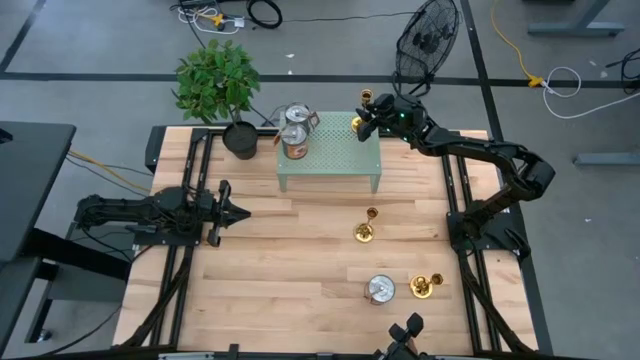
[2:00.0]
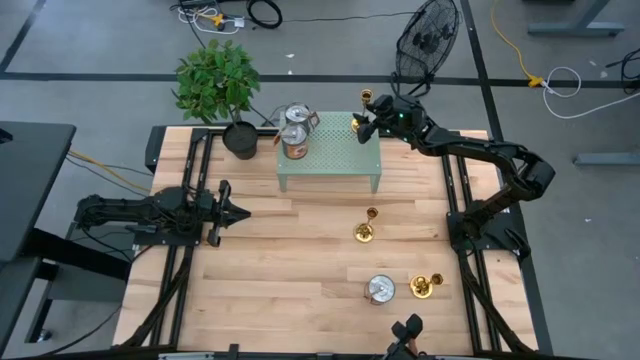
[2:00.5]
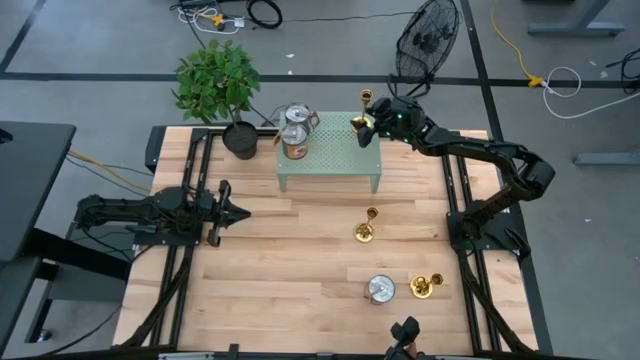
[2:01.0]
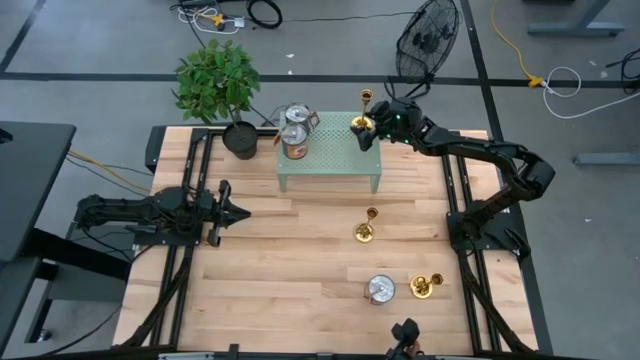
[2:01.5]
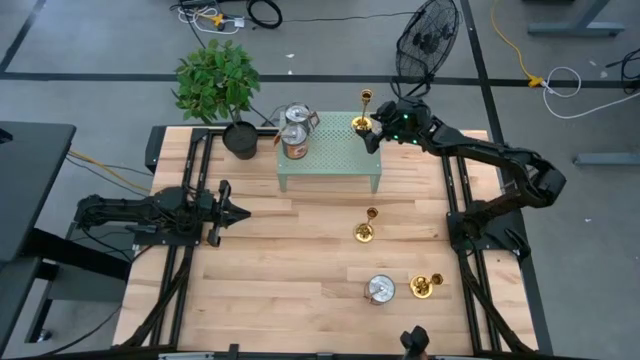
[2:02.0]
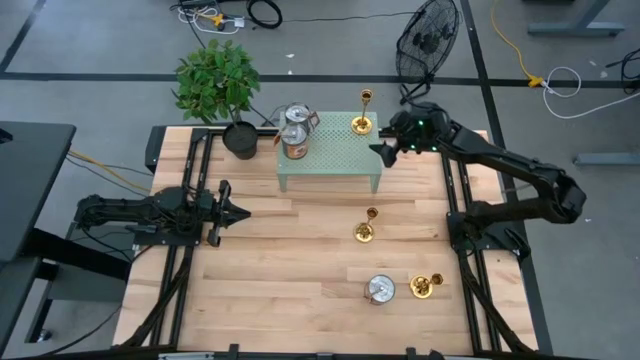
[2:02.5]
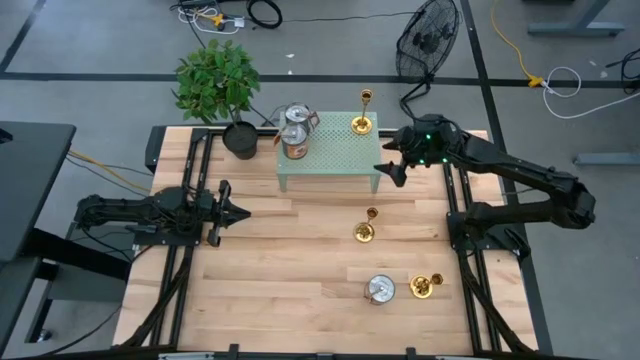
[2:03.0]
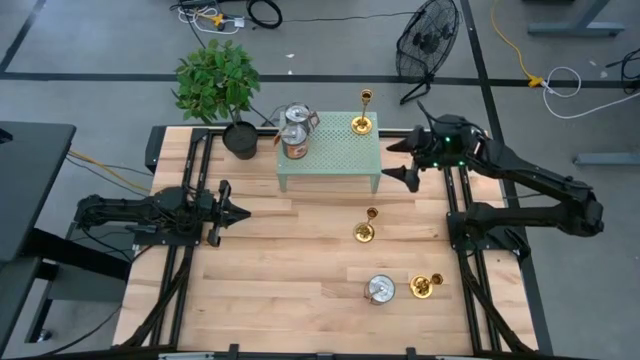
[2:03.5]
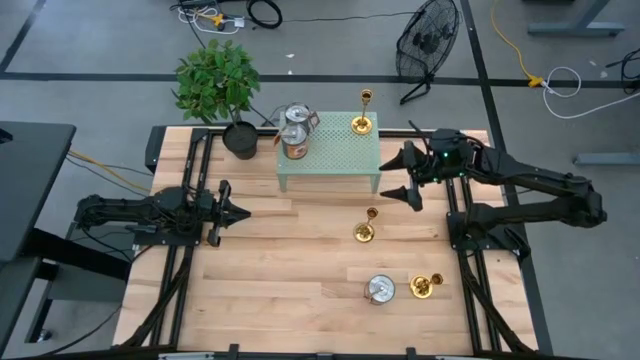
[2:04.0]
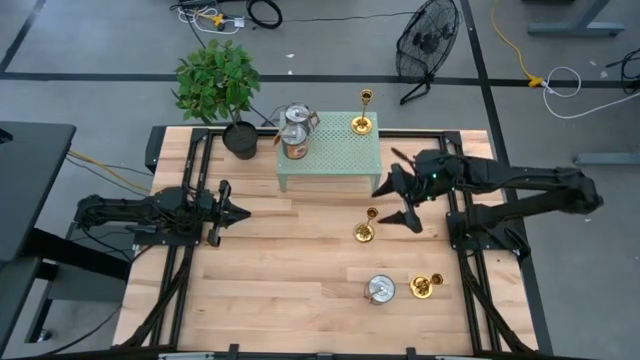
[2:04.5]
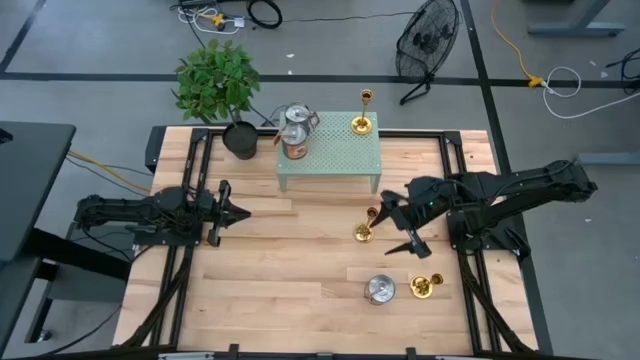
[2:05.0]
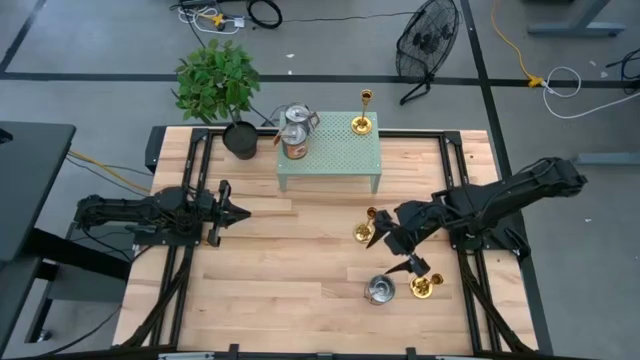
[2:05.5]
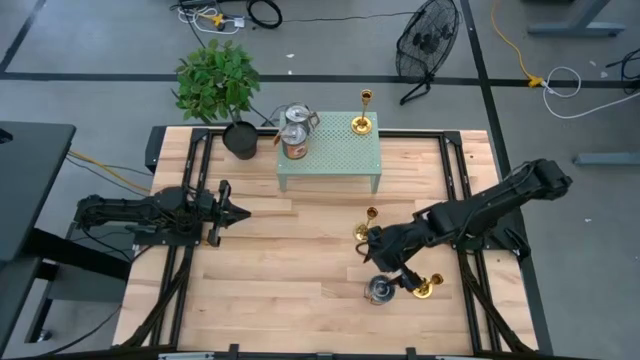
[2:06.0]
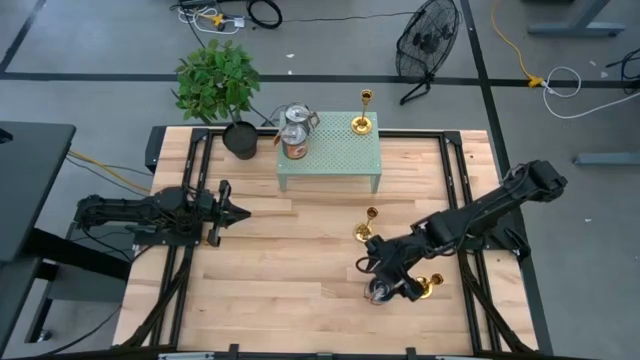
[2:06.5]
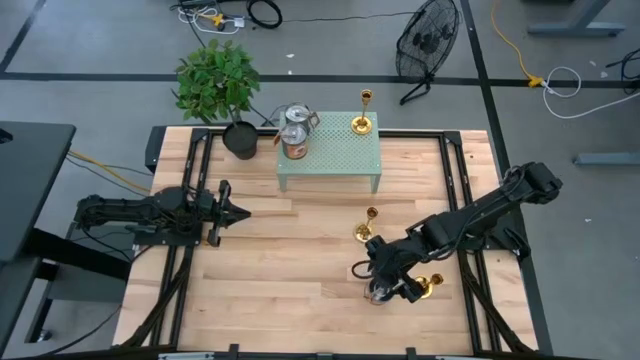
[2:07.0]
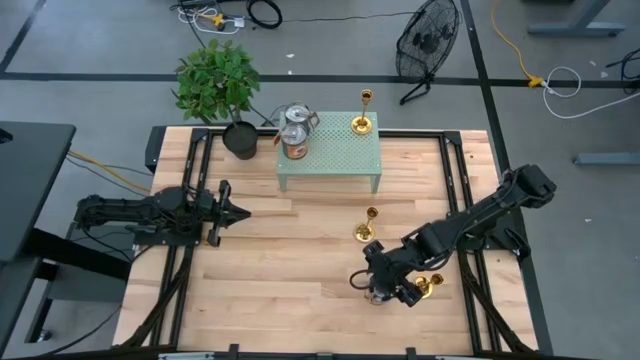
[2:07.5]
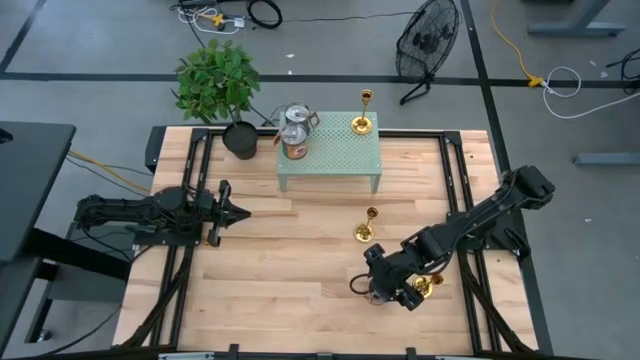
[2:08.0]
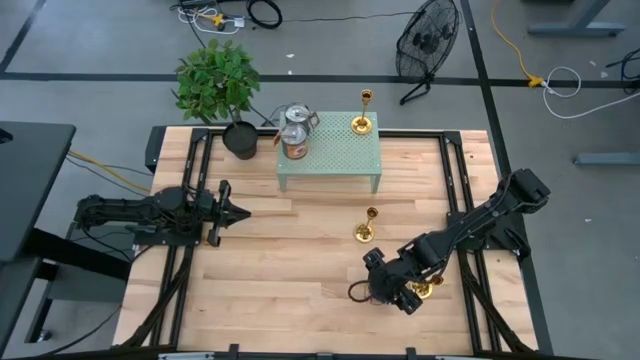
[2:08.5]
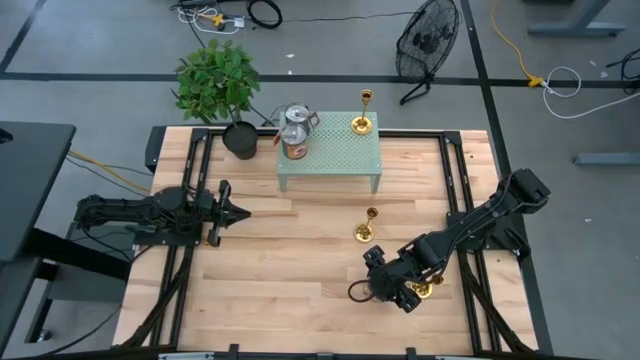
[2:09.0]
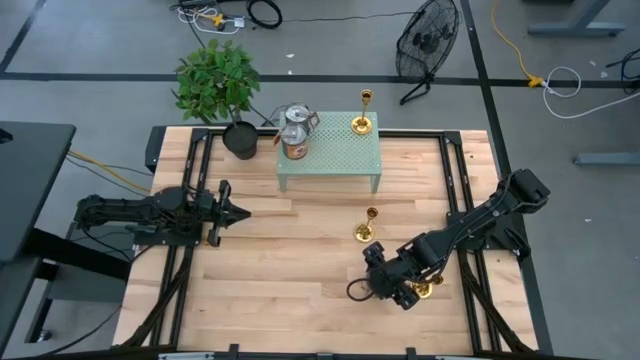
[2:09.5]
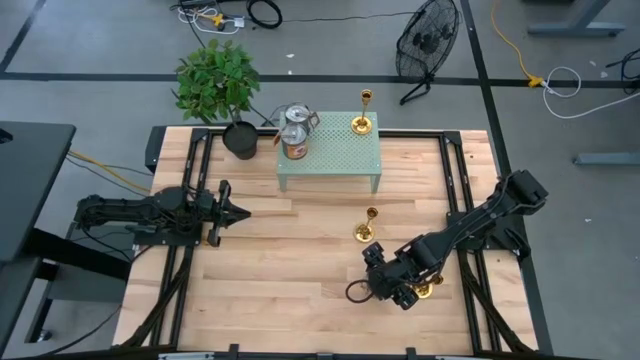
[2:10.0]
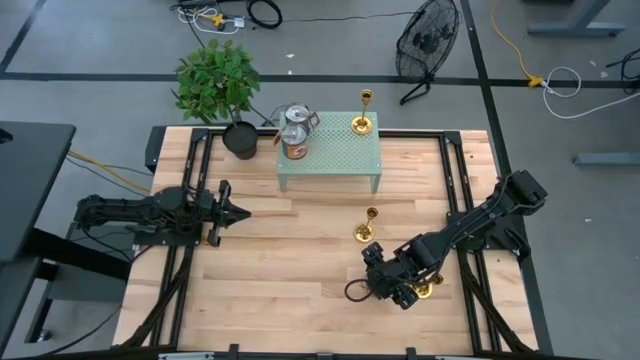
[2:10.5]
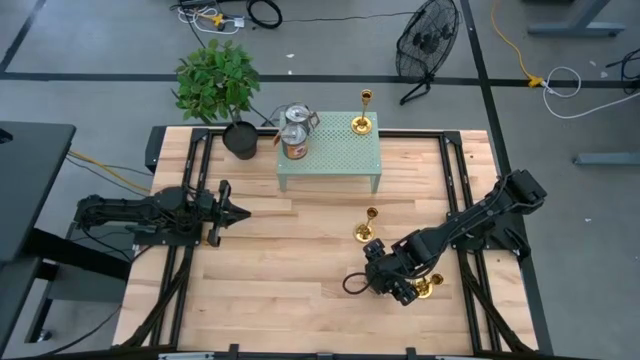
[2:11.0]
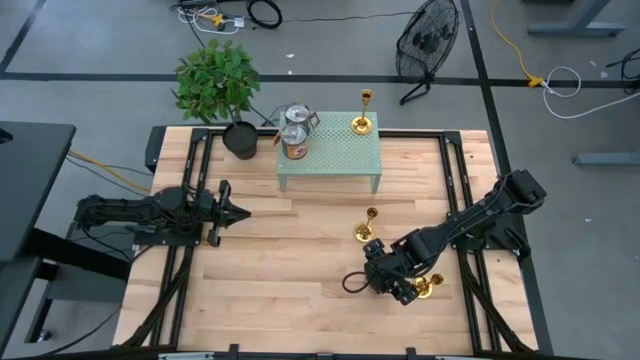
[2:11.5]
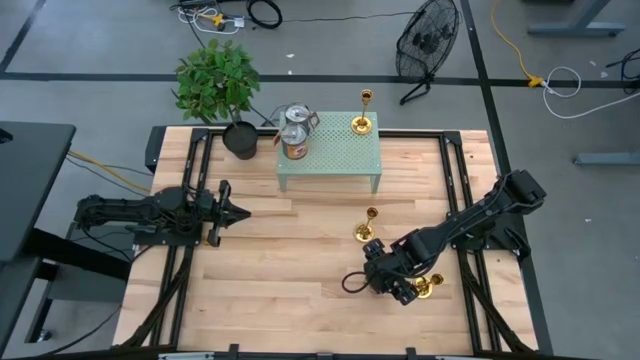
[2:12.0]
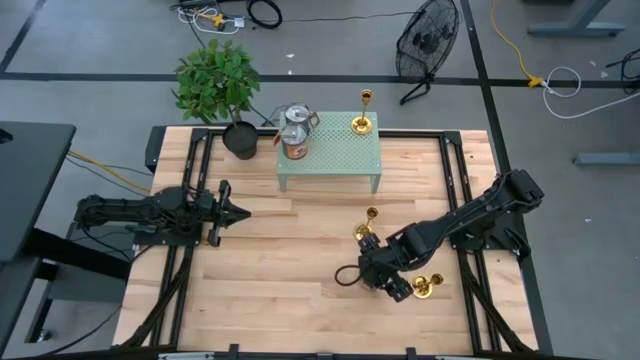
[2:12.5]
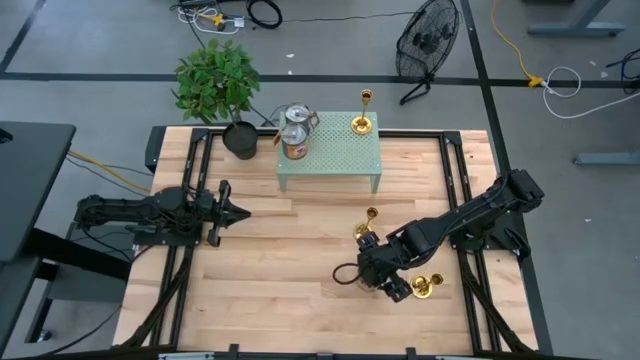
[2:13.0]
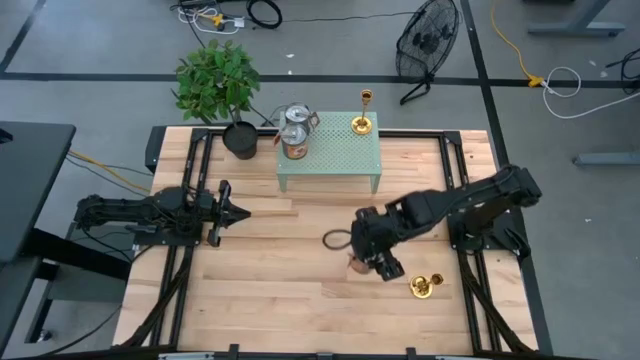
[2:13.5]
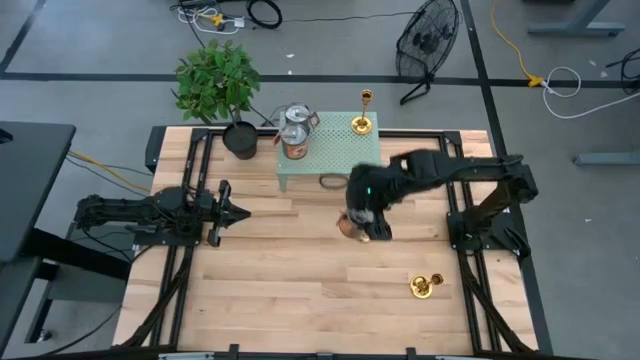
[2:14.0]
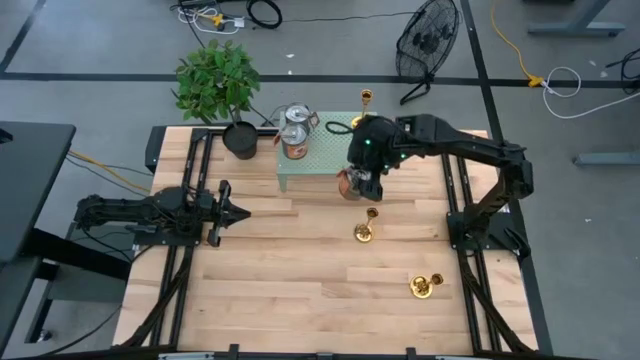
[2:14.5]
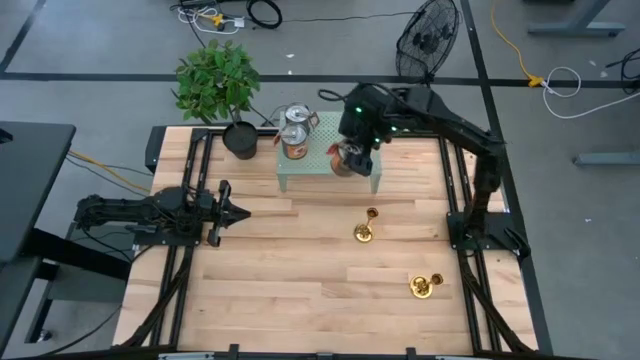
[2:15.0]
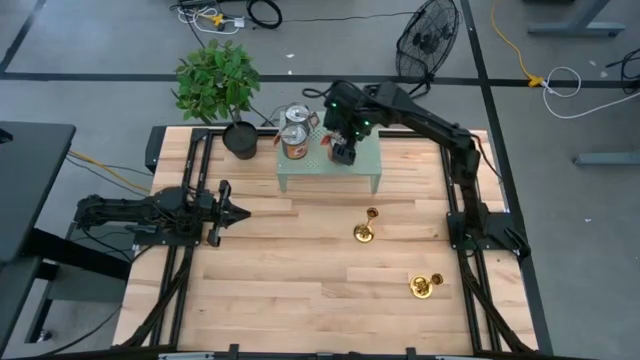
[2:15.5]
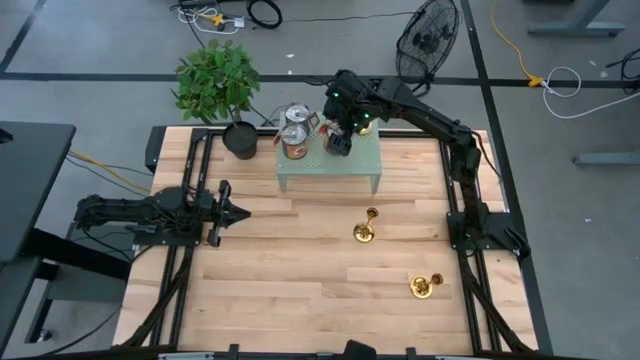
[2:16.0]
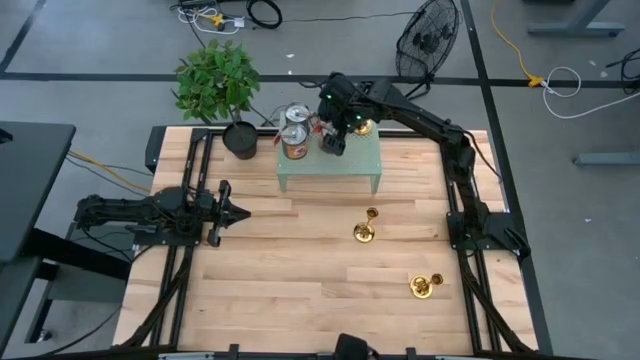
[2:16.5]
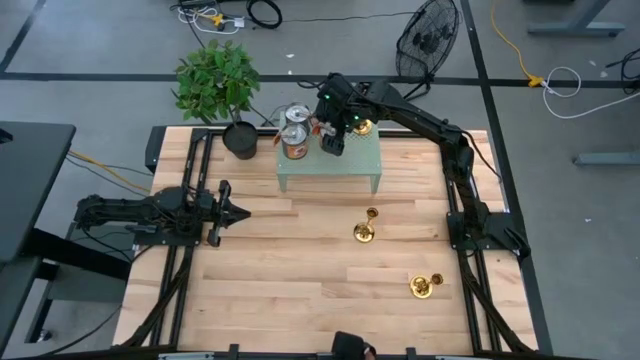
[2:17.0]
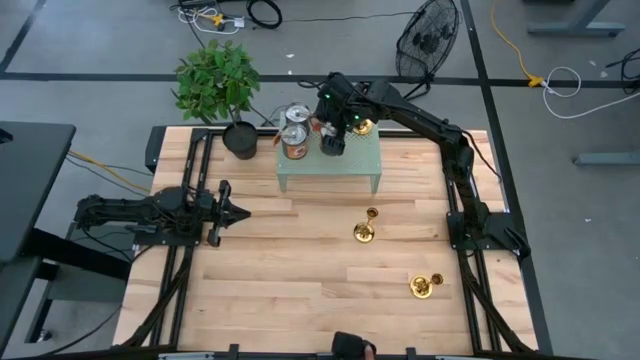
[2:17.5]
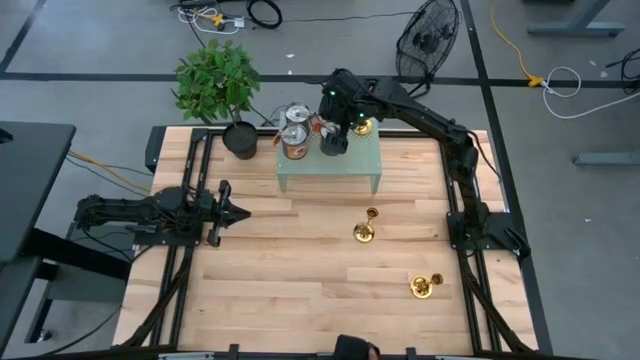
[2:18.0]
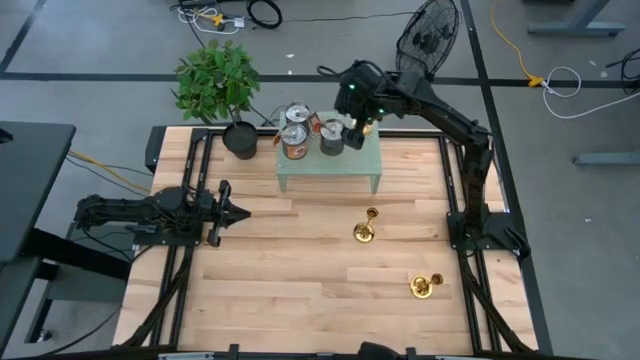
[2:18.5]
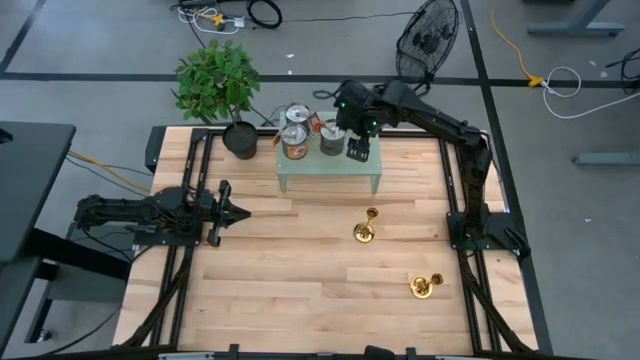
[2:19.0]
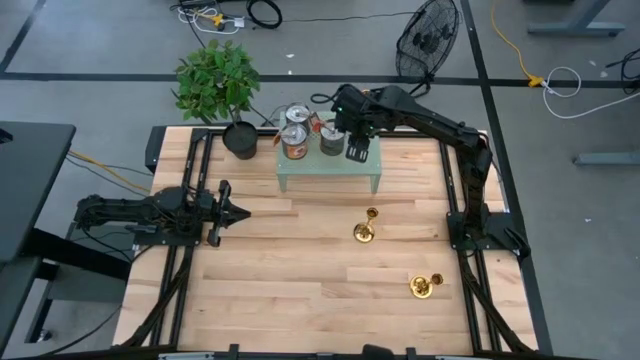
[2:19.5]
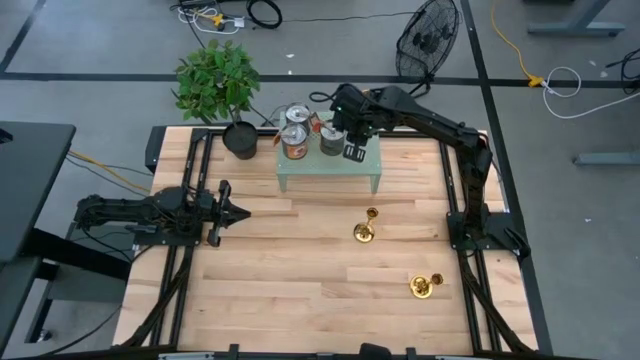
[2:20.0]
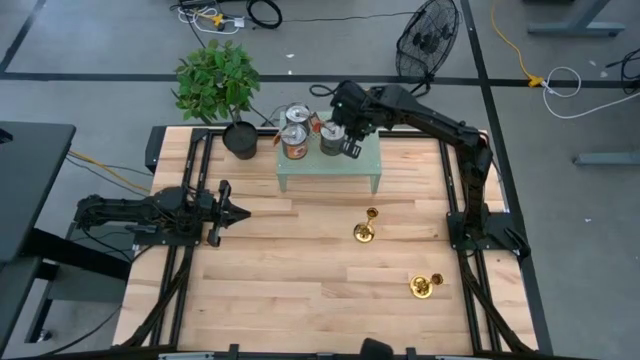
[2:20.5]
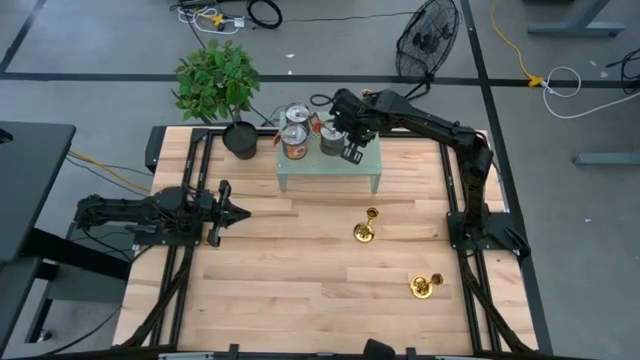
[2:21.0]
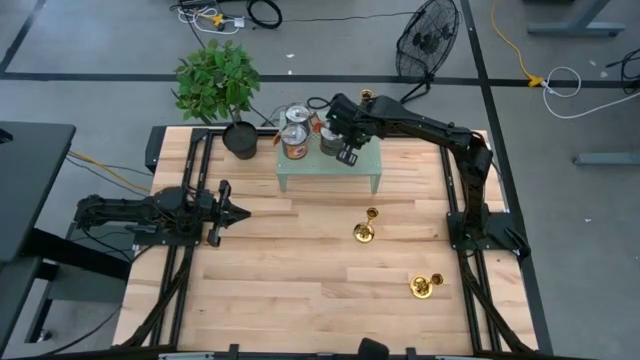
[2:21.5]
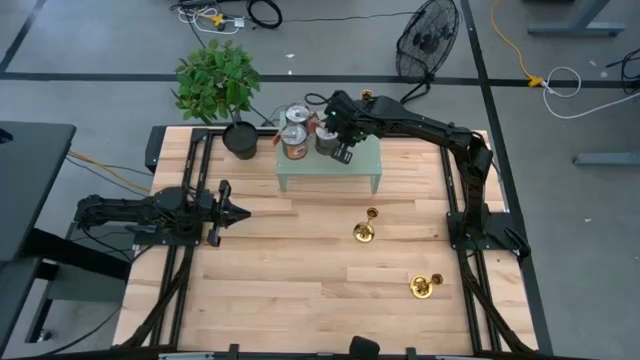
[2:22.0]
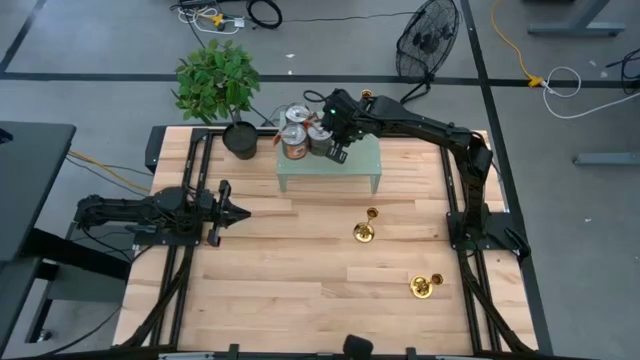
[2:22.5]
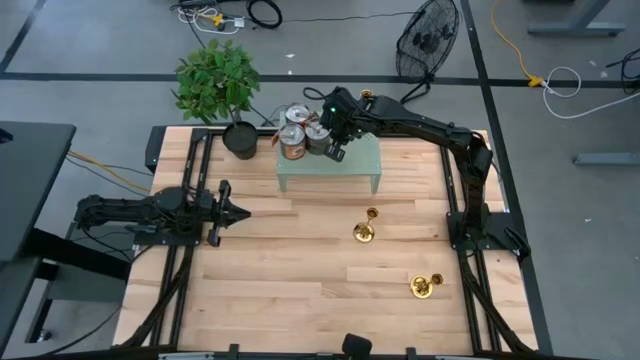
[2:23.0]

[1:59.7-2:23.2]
Task: Pick & Place candle stick holders
Put the silver scented candle on the shelf
